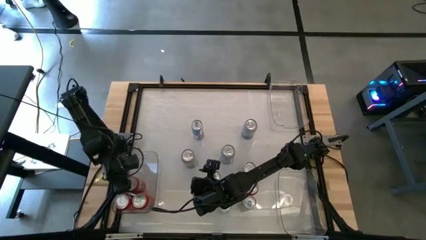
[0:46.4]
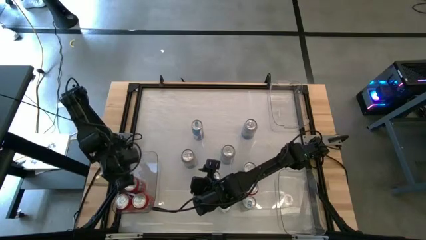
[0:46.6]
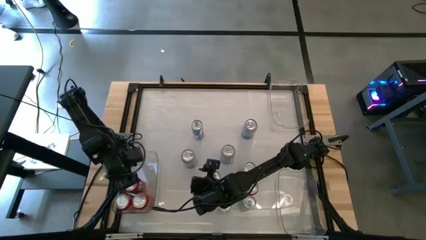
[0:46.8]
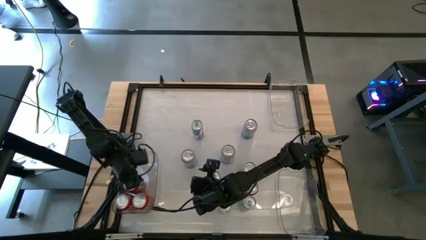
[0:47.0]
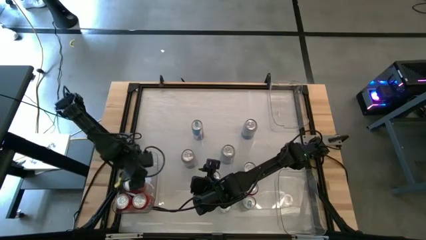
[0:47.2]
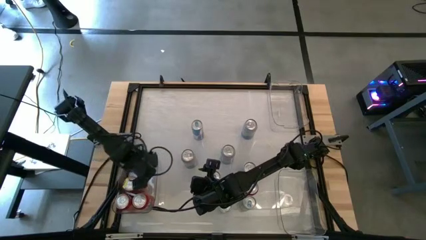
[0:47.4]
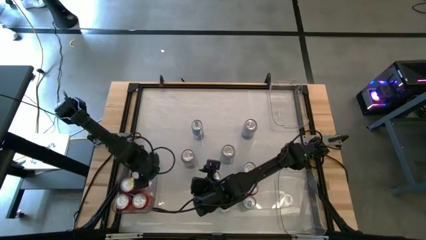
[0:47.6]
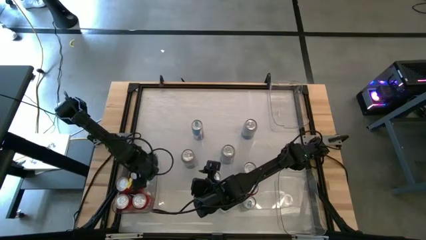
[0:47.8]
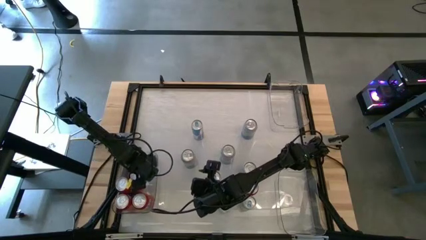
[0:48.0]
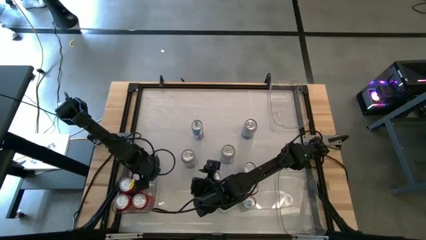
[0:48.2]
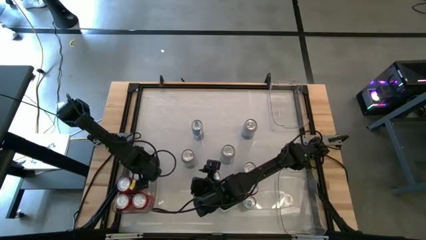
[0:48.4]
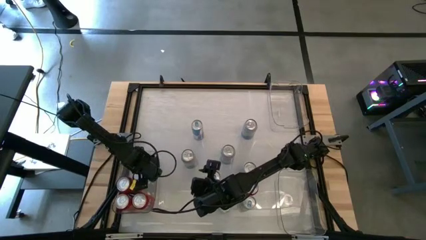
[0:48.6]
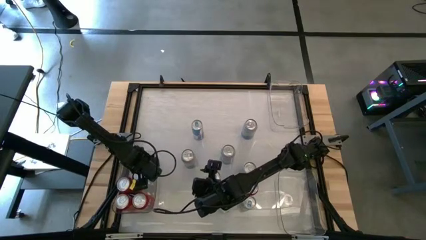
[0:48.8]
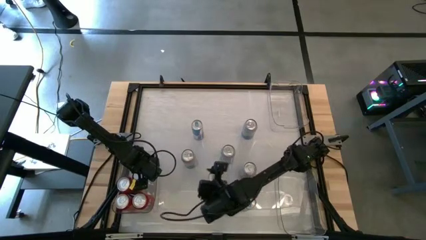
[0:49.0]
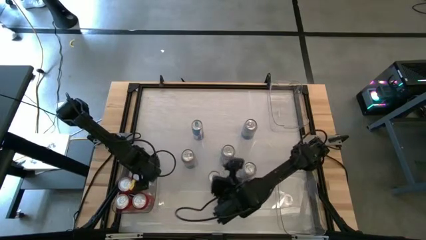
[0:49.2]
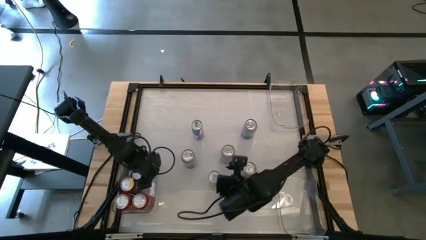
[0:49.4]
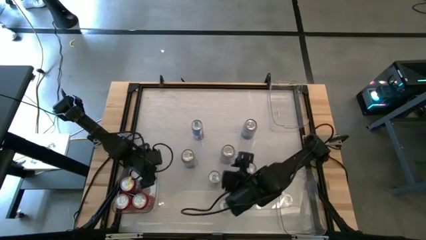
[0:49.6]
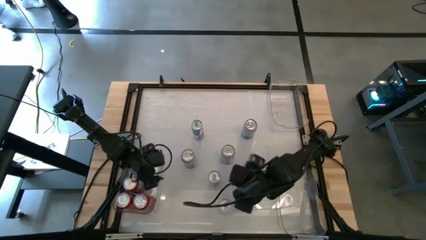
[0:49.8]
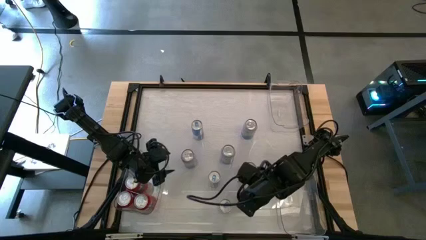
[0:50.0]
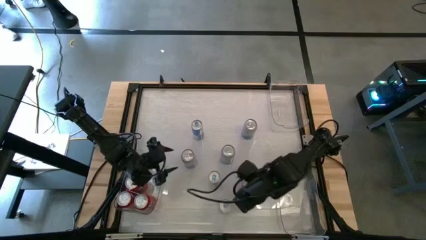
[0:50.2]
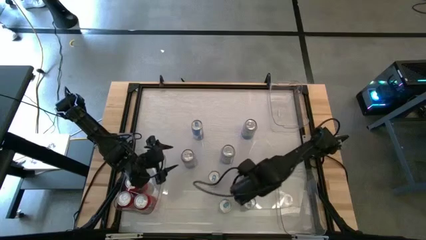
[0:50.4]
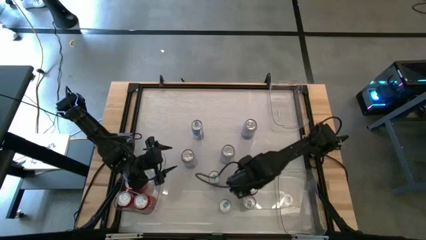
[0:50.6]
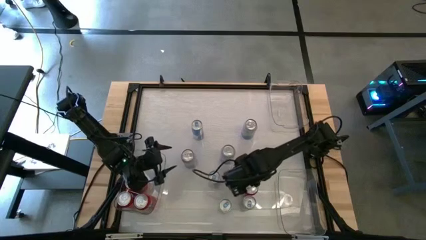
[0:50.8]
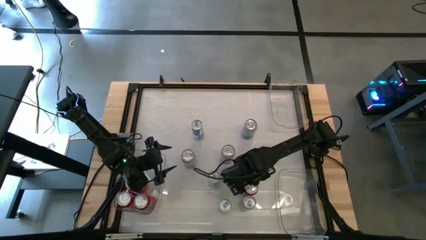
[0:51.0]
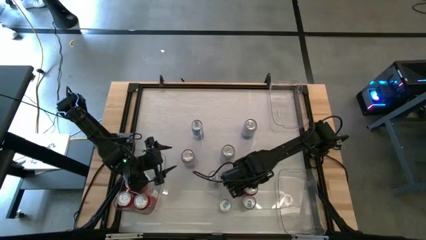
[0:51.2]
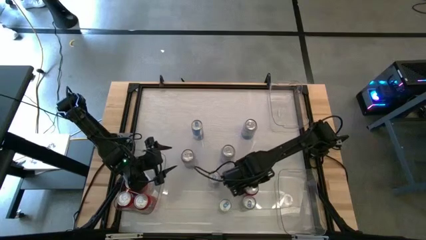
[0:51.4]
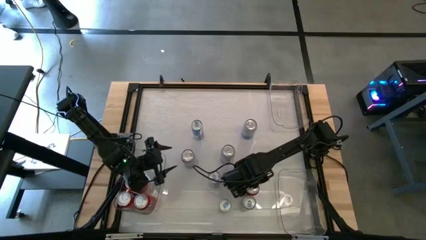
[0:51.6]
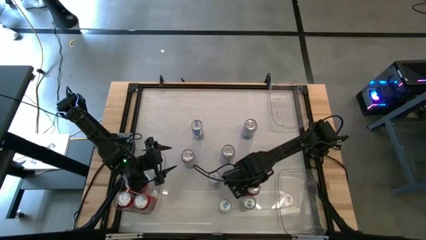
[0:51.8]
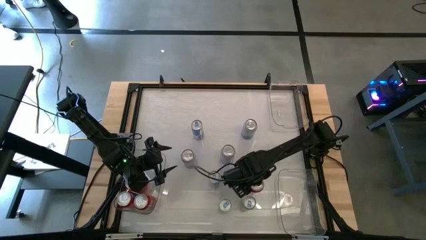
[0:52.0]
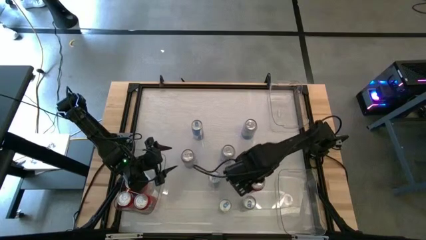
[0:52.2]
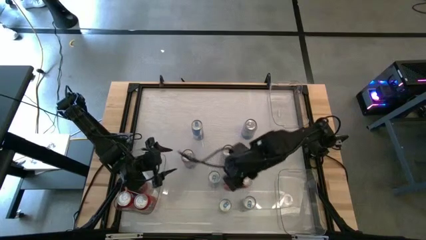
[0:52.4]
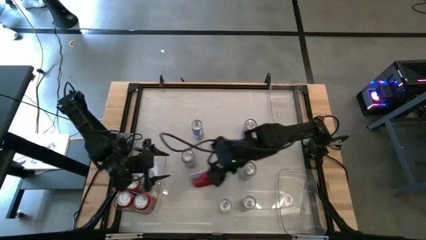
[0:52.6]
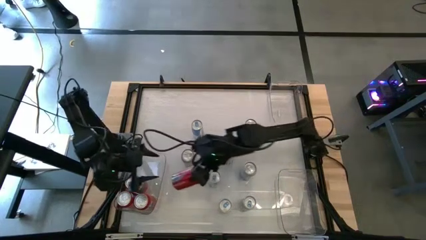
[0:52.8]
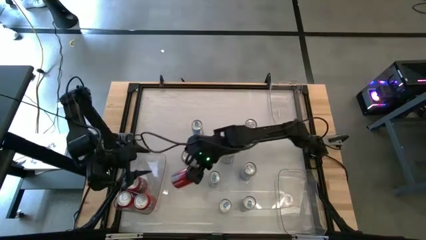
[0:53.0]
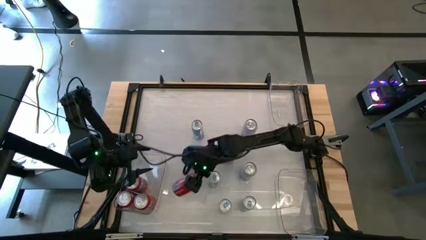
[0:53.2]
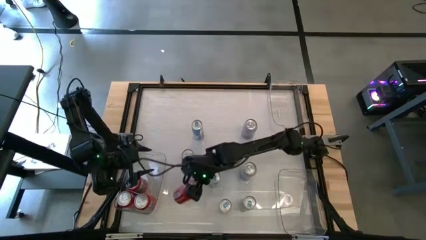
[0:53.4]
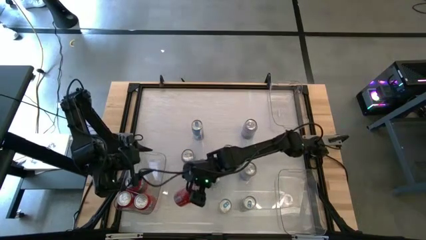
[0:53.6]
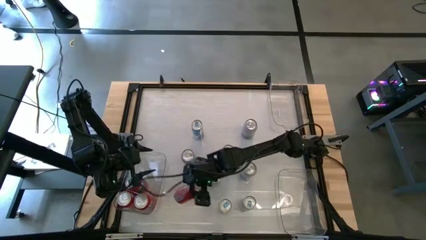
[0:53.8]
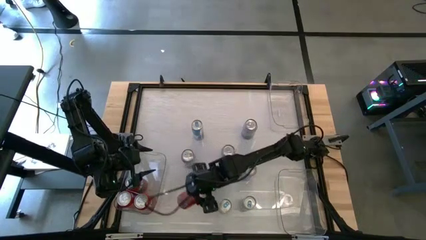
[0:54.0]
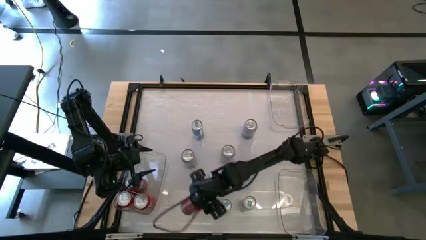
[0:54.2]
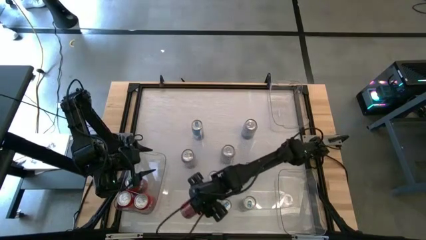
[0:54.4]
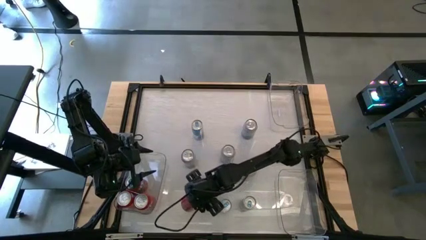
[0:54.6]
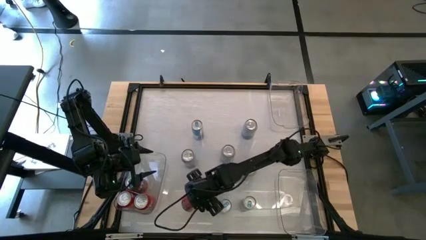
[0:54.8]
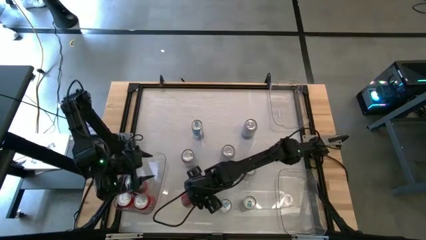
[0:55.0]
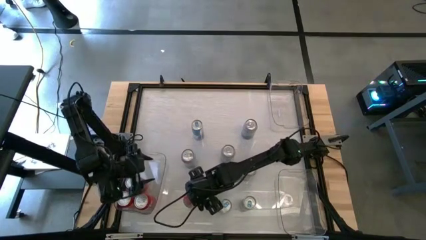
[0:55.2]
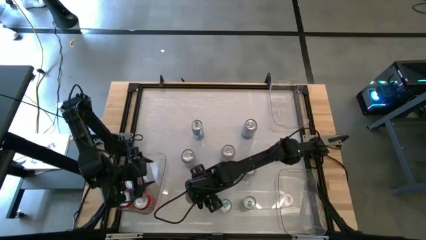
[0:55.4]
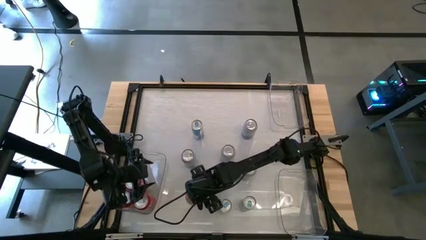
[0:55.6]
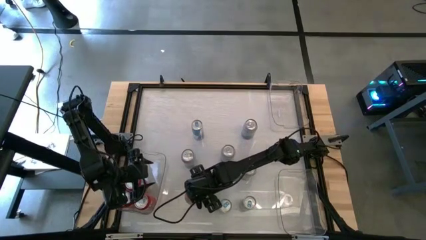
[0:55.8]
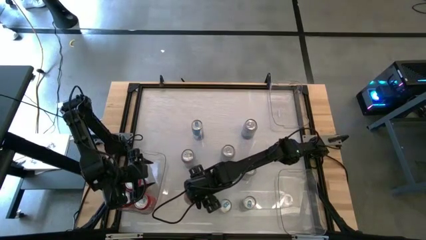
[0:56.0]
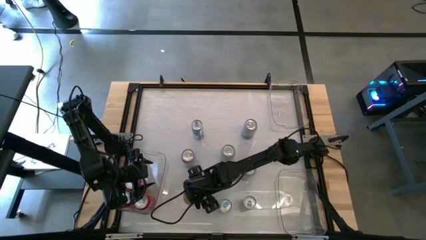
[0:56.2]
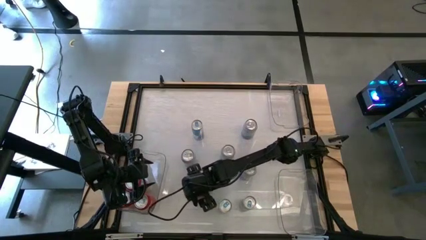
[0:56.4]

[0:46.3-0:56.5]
Task: Sort soda cans
Put the bottom right red soda can into the bottom left transparent bin

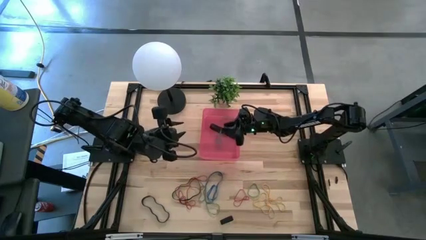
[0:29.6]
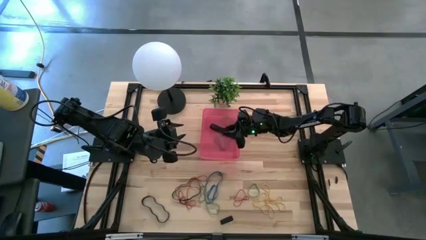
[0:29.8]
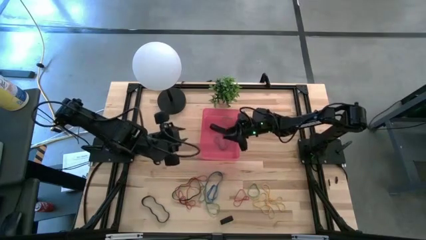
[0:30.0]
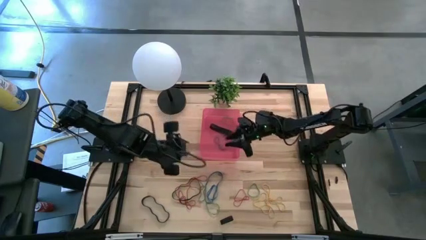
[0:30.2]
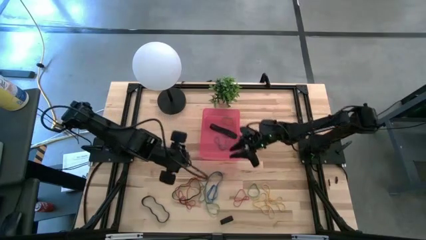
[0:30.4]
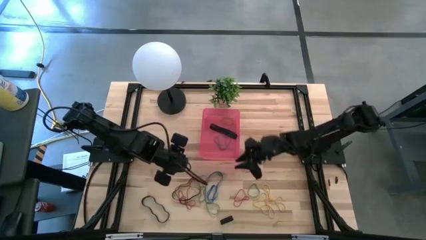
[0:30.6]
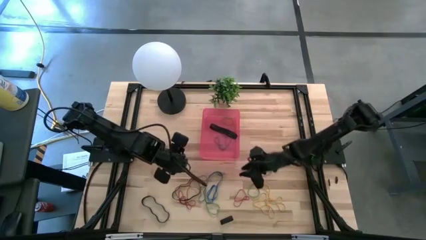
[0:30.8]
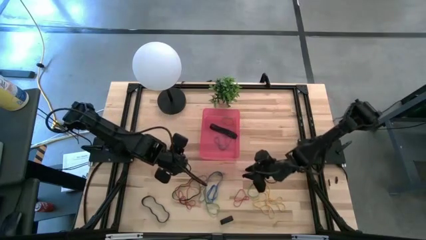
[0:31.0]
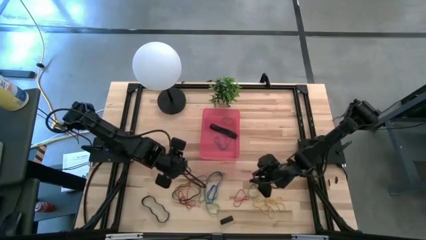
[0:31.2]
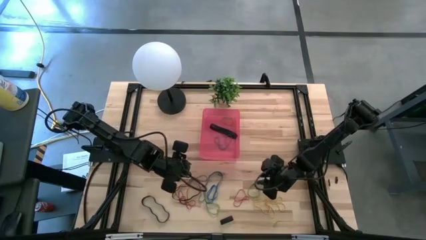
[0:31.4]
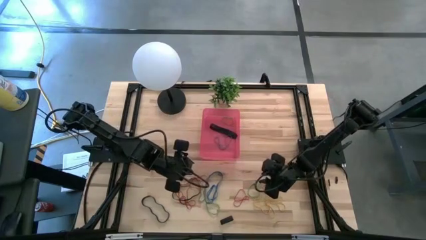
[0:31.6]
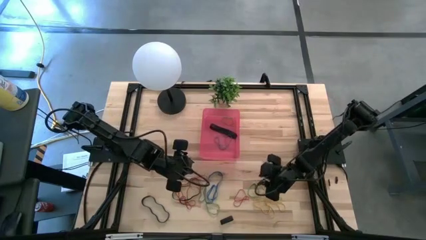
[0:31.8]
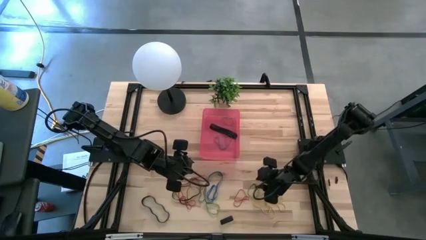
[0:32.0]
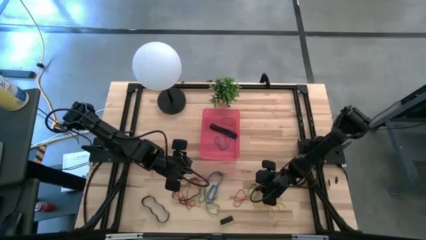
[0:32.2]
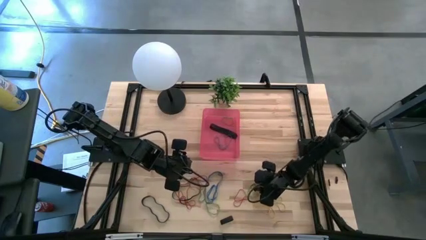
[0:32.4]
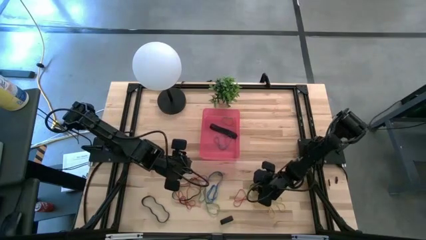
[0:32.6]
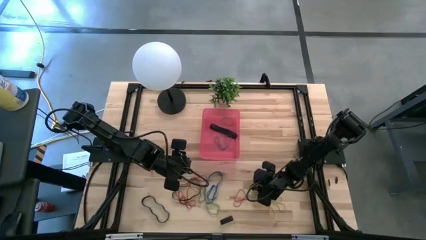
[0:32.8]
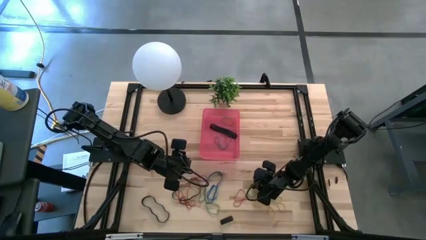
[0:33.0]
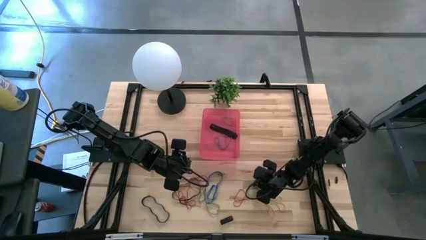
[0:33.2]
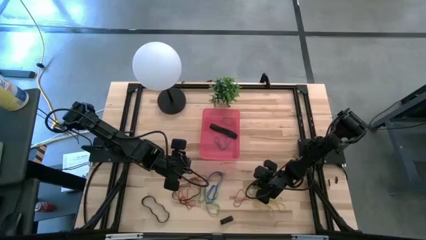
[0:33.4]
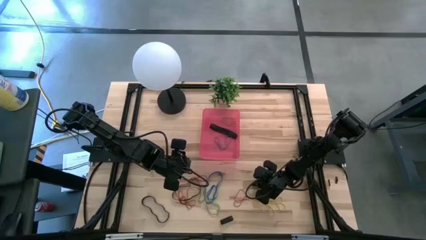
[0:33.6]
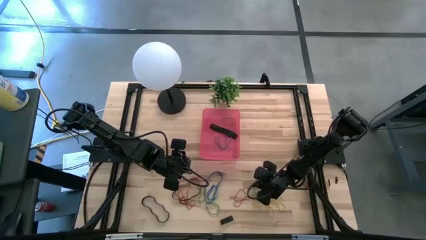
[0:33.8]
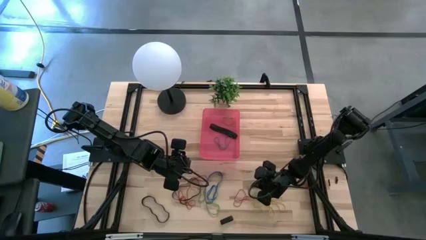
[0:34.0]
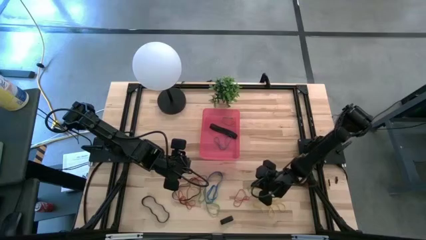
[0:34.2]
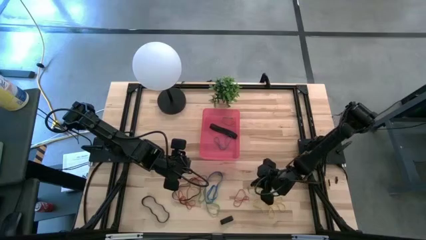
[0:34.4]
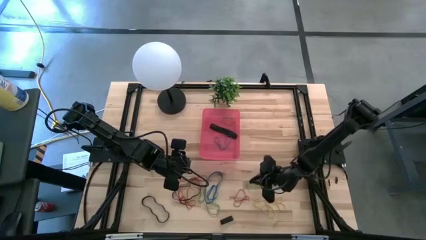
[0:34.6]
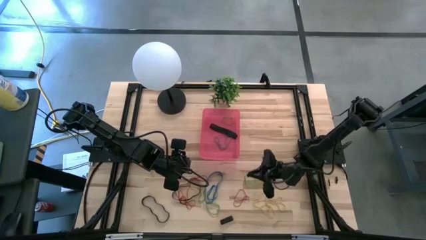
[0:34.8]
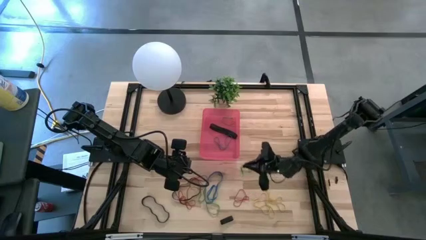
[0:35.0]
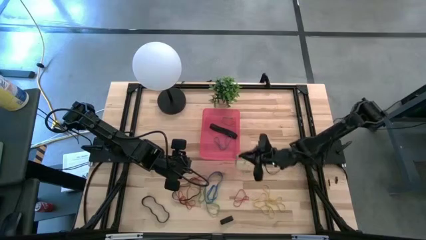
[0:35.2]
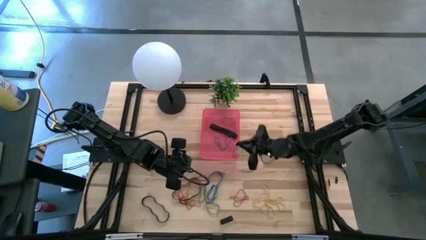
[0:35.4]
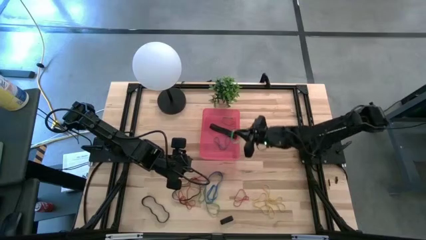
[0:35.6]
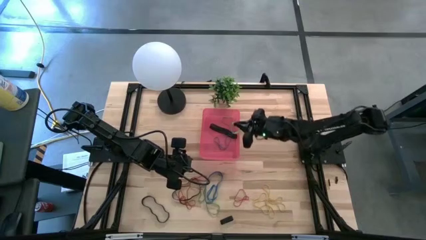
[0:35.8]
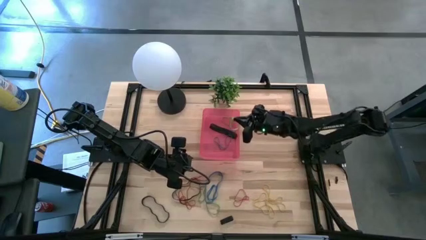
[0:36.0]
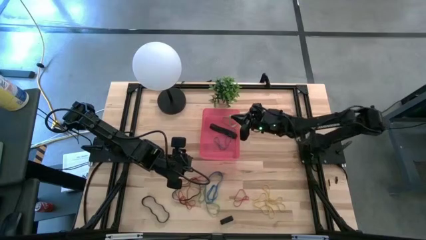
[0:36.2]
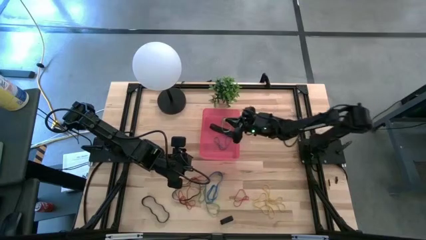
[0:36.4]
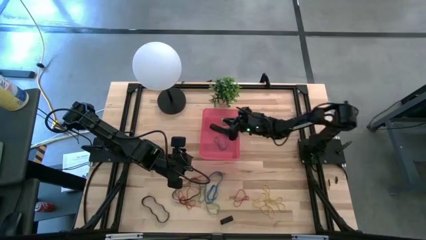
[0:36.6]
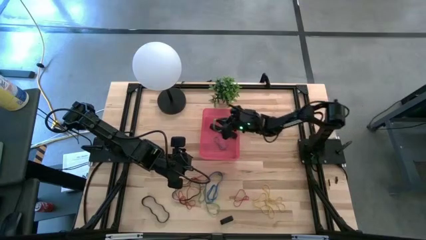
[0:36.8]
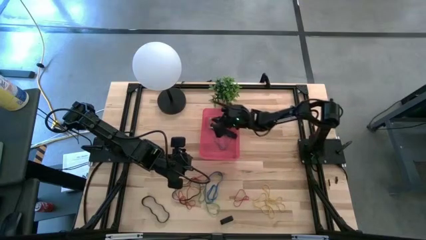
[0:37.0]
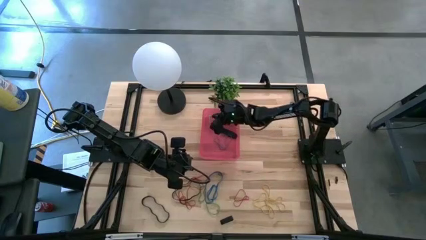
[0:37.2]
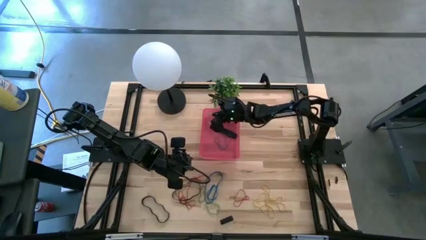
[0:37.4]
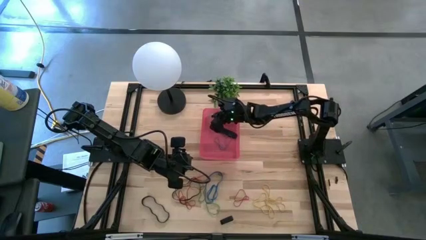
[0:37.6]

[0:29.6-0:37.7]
Task: Pick and place rubber bands into bin
Put the green rubber band into the red bin
